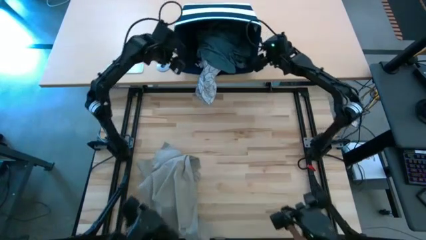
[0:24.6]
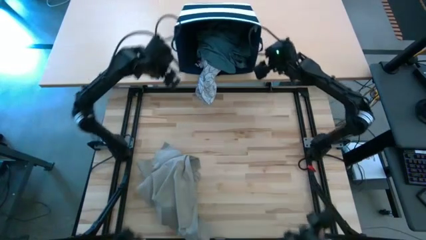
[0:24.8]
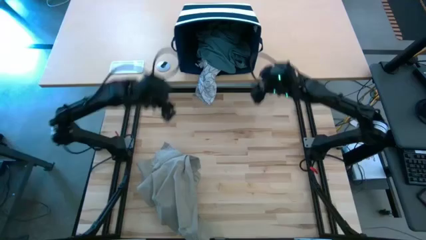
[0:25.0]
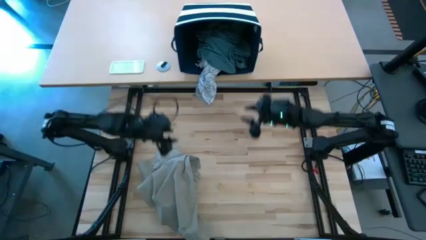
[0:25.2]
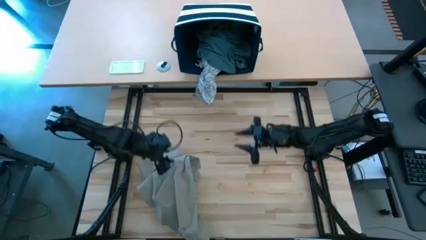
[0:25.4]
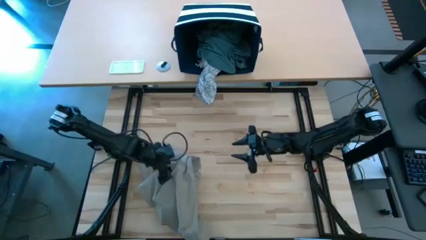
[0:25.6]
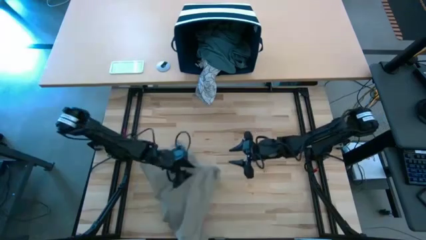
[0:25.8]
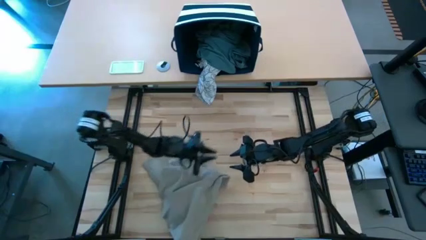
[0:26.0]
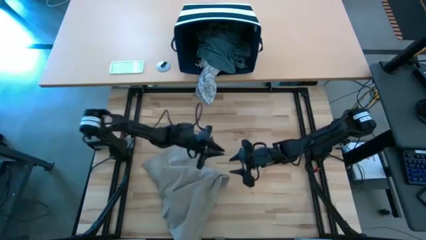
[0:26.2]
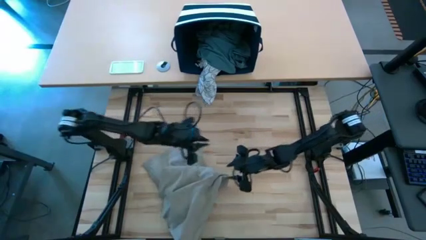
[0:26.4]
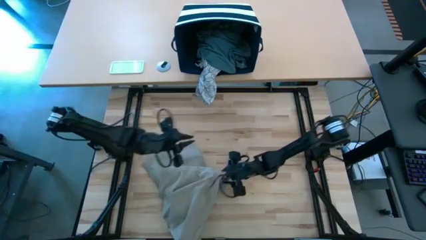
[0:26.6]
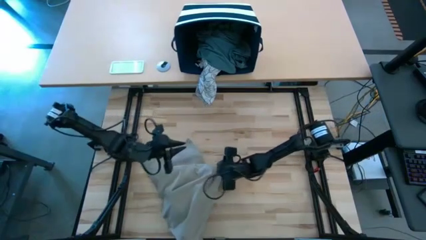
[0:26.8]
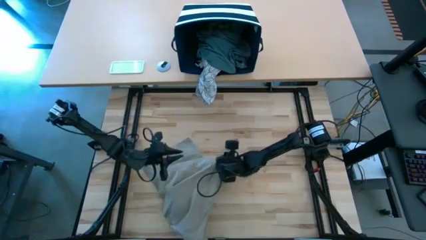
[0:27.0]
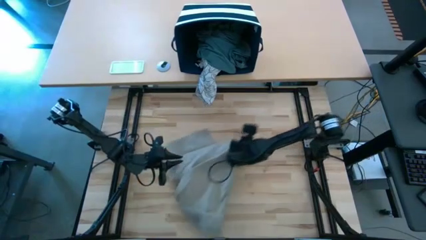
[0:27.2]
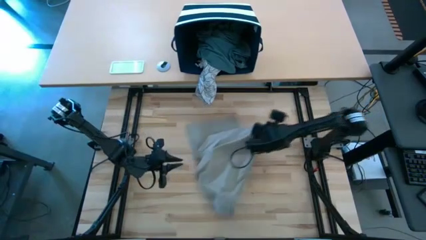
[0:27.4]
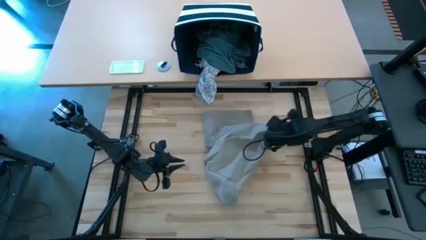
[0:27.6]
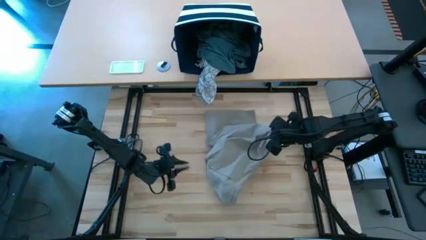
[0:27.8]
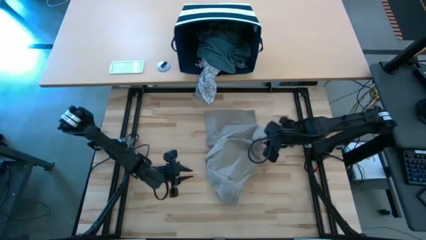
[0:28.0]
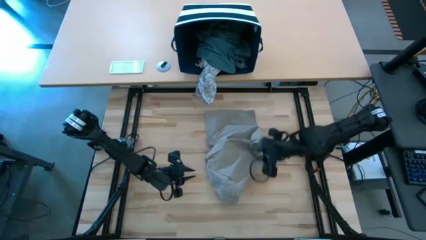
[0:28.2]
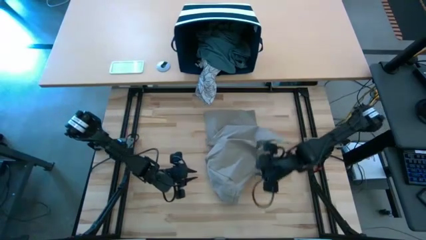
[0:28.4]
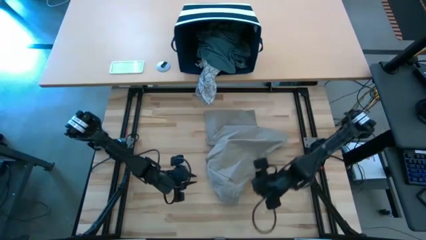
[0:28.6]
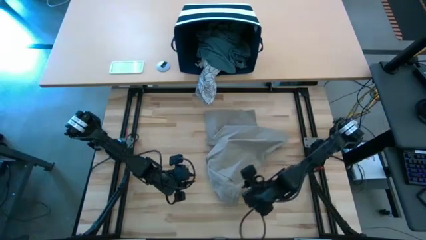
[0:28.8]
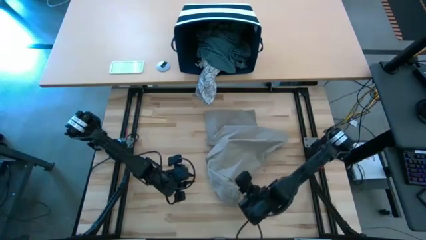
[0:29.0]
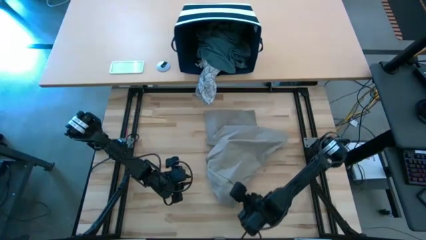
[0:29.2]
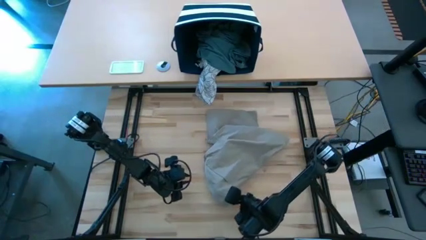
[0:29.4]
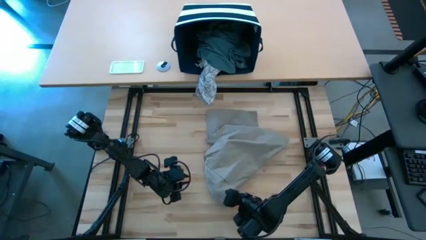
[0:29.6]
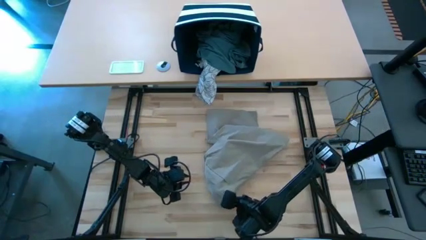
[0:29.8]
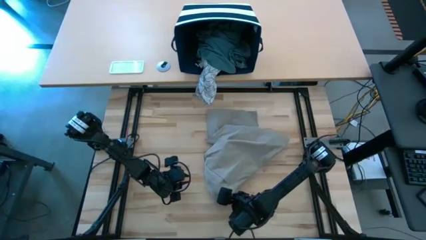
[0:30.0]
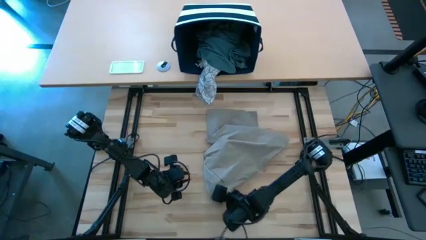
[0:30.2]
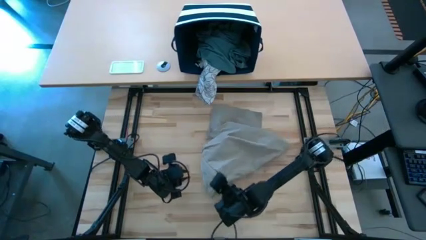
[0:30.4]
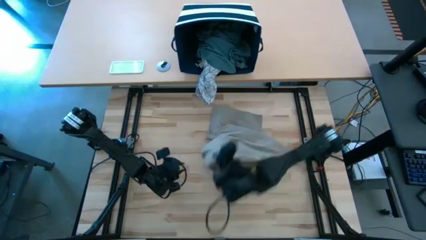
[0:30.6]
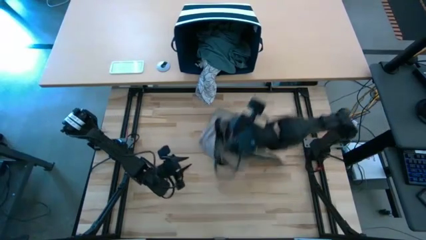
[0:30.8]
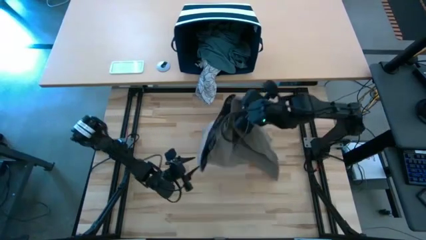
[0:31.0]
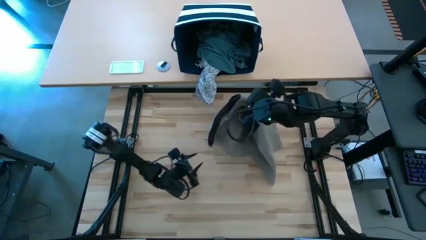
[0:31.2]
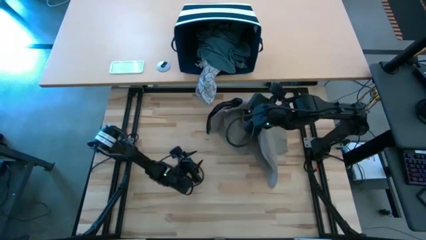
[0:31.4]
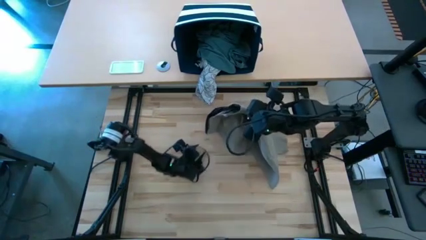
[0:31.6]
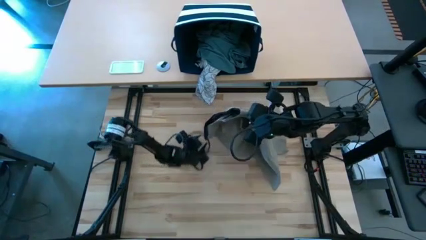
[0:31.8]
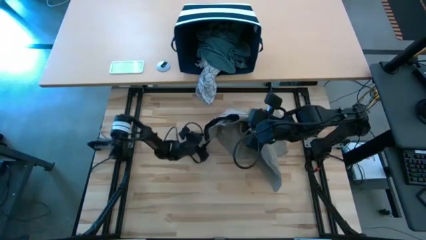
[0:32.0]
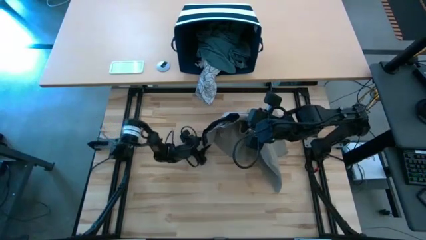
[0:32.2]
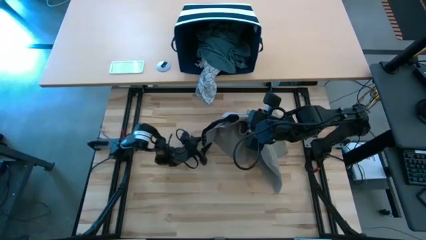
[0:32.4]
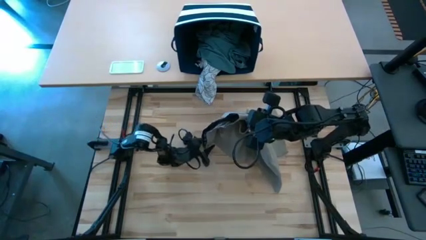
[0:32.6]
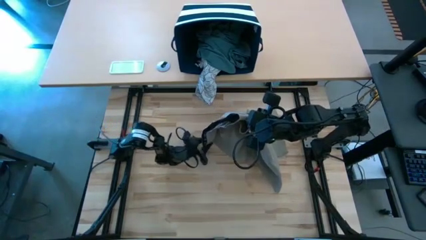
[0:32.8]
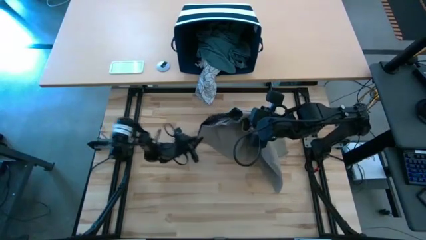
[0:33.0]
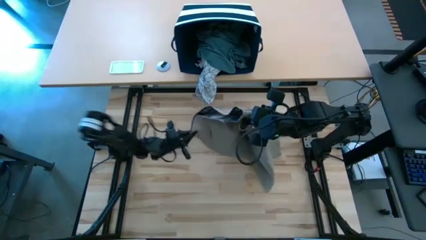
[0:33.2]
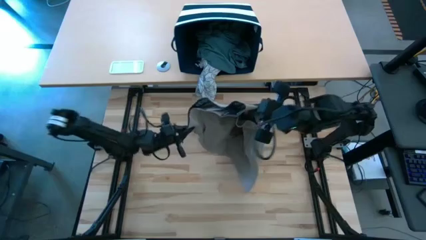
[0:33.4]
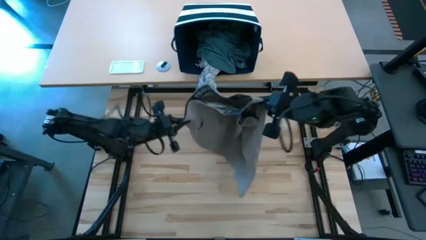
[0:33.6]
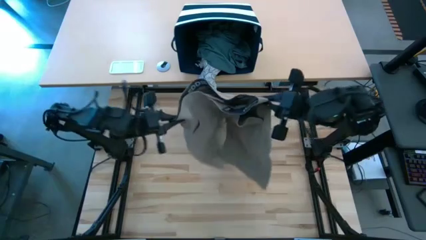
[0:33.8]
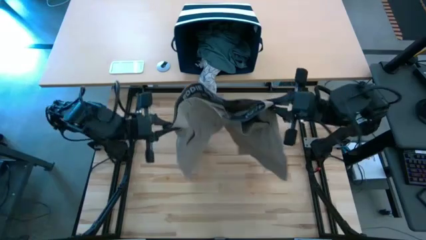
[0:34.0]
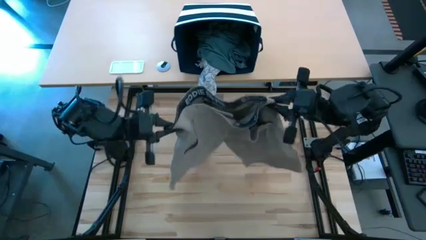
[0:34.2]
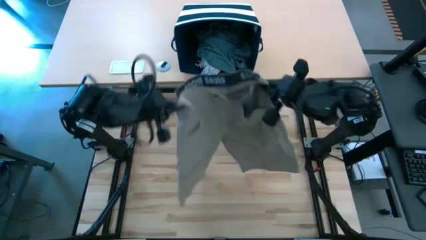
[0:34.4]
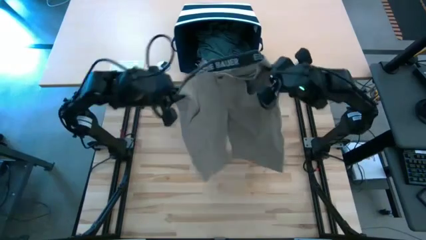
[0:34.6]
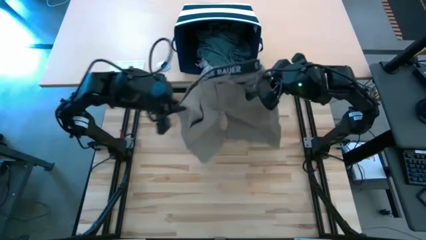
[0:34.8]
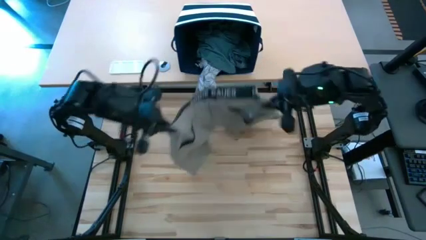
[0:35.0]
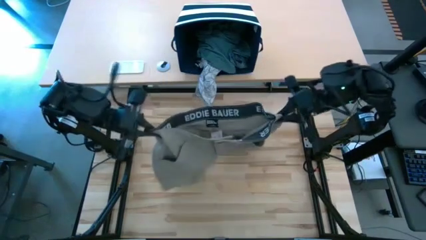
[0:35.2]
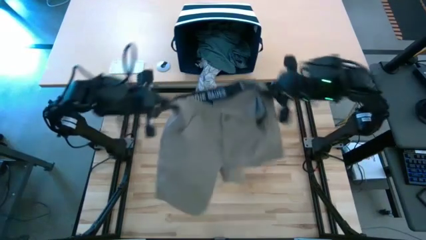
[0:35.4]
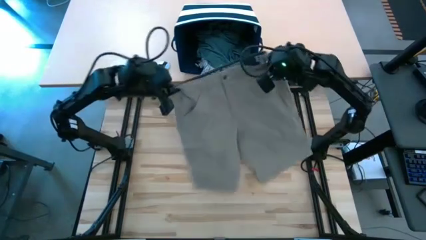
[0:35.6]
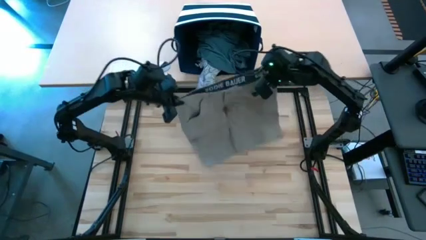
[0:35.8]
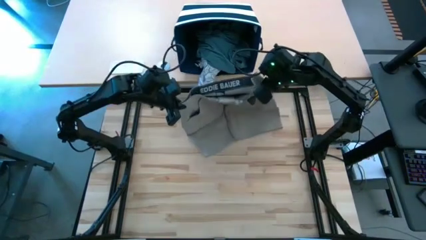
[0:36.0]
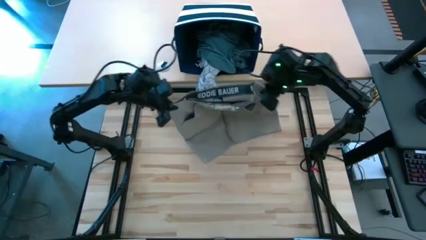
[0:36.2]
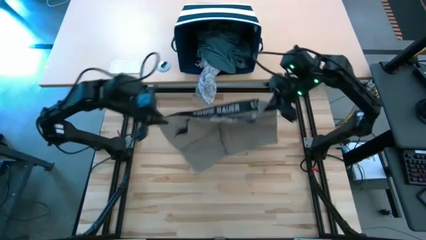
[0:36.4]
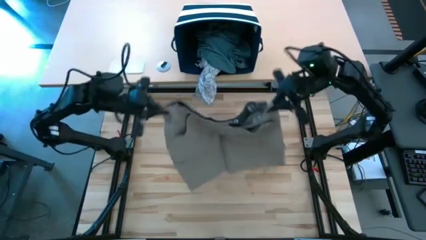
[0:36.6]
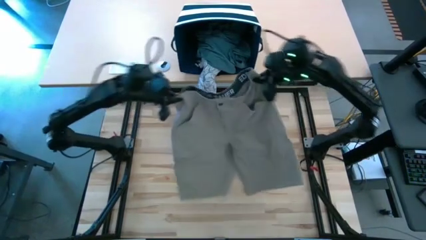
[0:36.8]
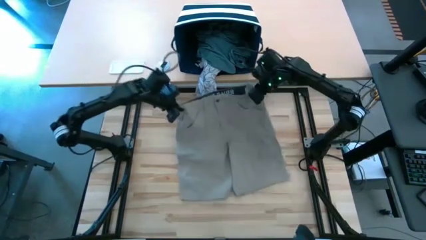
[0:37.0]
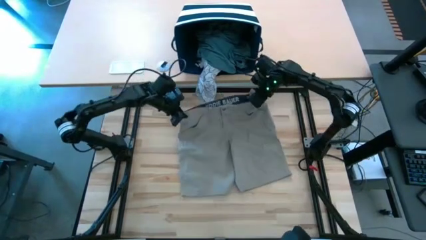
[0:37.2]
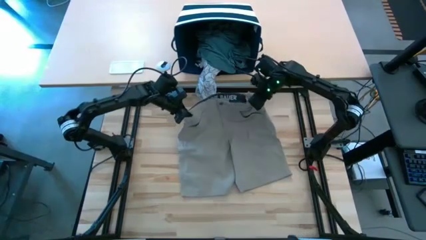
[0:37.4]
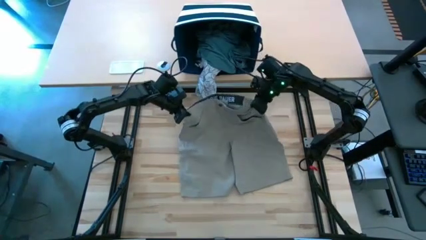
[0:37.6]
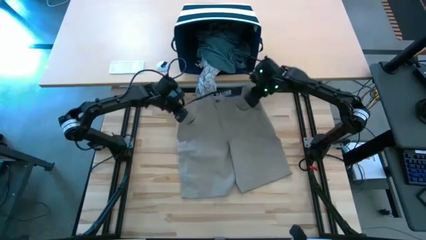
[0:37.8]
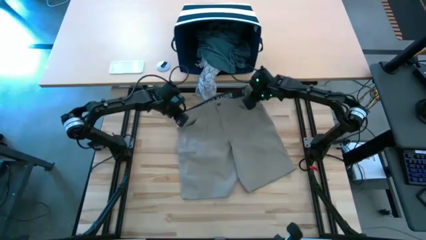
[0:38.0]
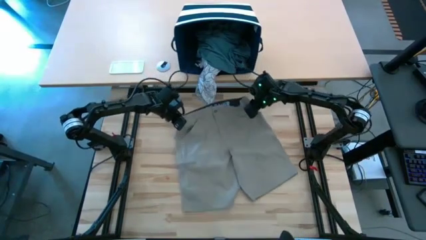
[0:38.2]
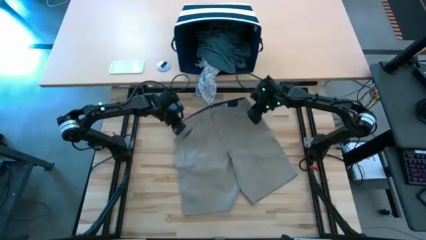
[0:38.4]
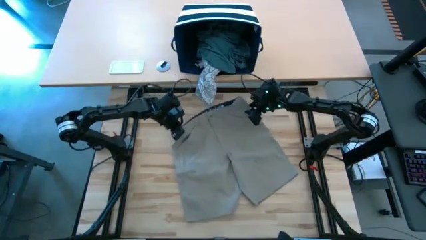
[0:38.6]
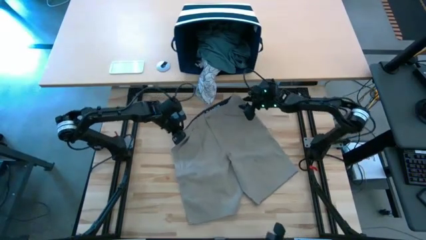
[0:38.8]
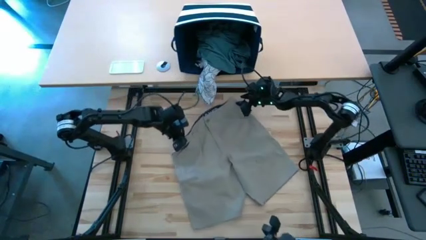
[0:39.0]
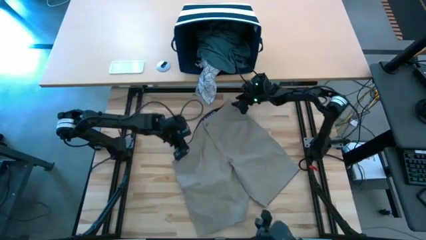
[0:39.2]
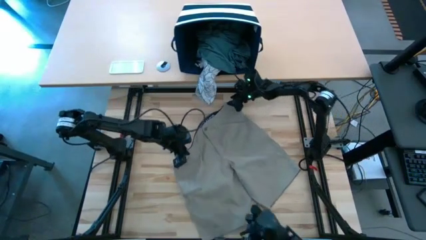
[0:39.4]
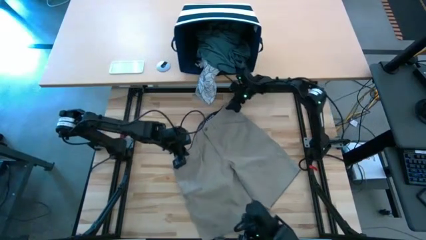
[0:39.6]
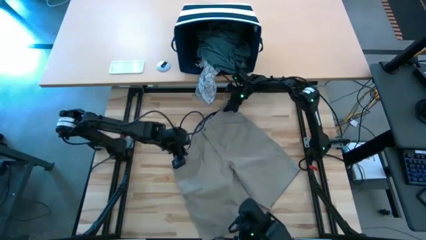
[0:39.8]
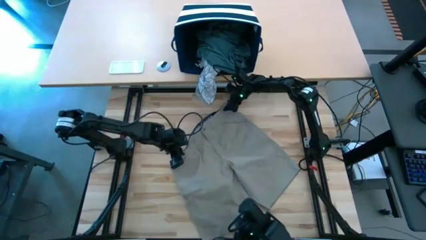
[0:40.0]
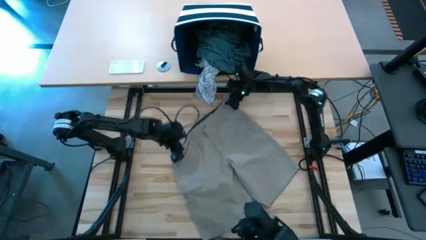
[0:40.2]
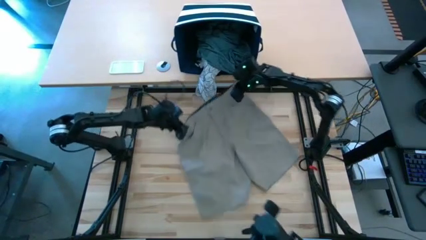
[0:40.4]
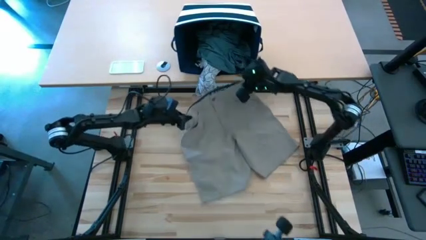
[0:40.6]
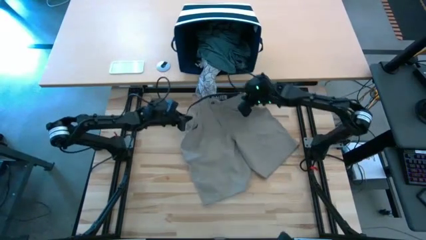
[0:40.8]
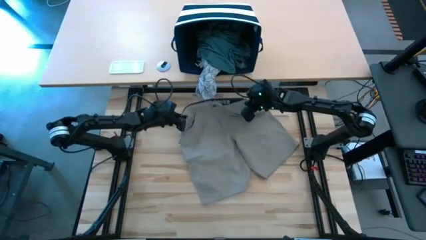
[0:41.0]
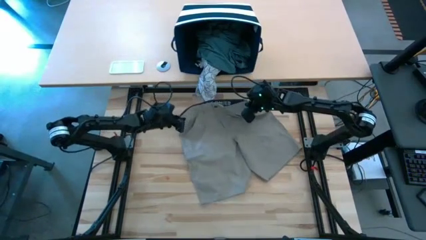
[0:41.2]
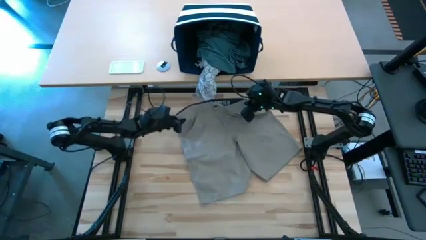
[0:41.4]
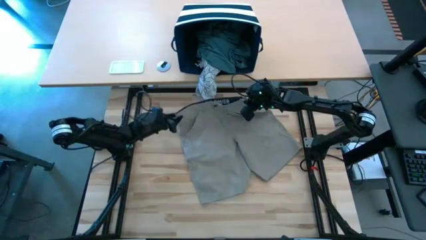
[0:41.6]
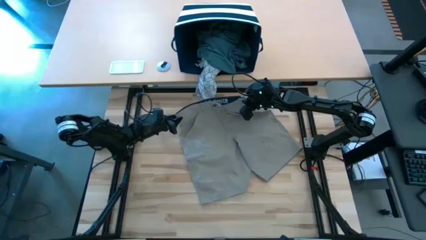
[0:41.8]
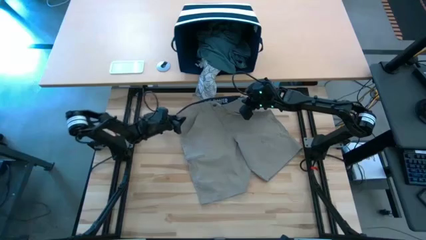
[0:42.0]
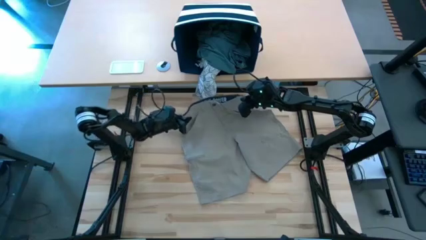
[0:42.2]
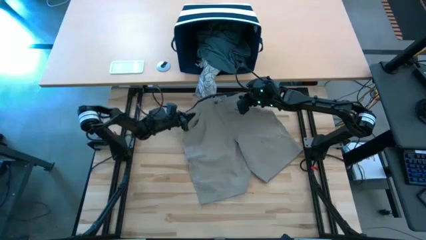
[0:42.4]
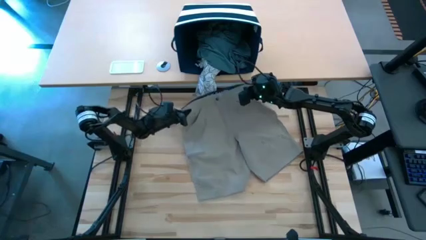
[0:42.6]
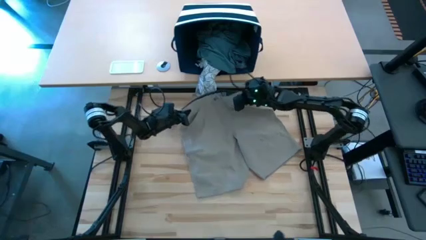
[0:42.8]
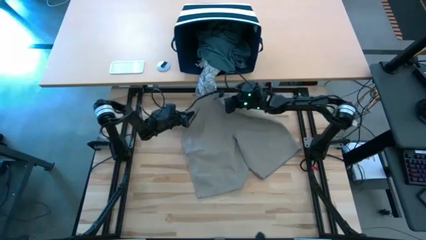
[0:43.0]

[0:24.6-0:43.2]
Task: Fold Laundry from Bin
Fold the brown shorts from the blue laundry basket
